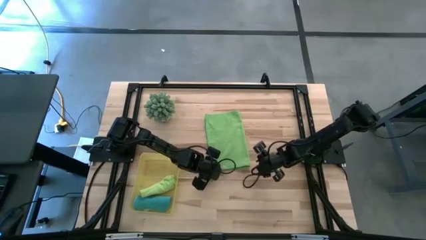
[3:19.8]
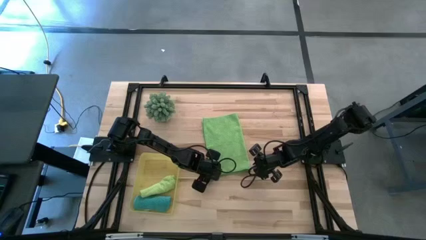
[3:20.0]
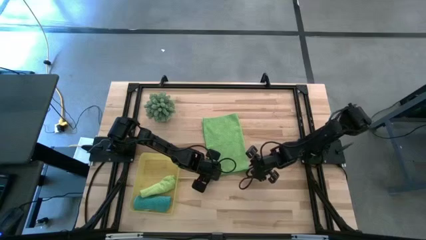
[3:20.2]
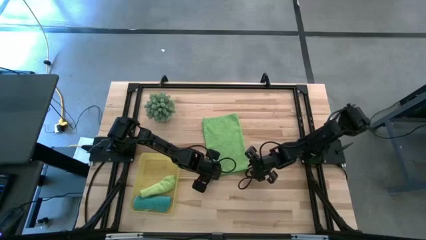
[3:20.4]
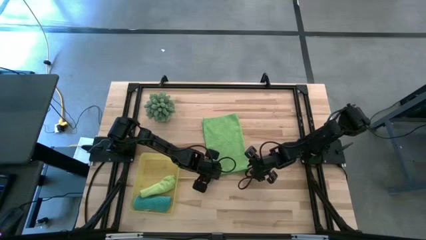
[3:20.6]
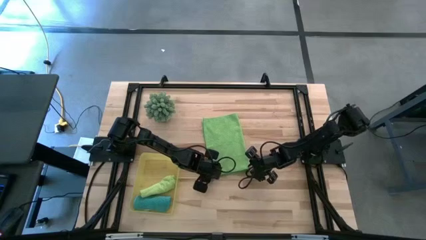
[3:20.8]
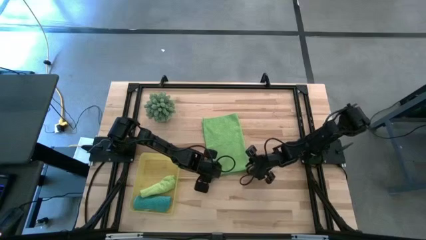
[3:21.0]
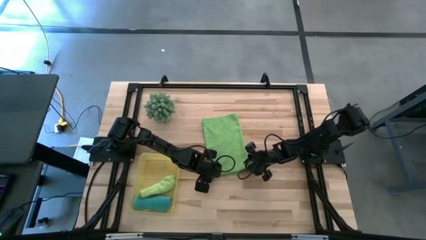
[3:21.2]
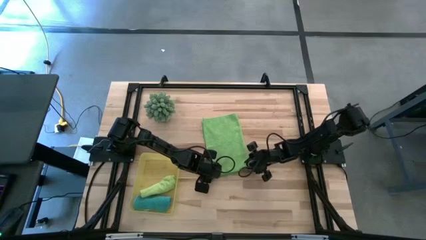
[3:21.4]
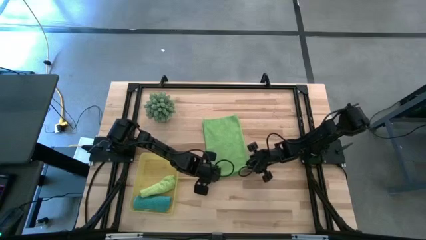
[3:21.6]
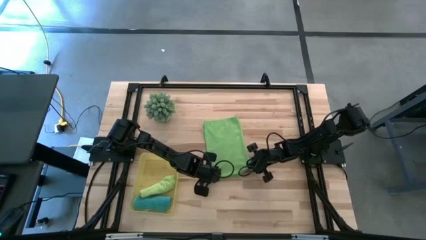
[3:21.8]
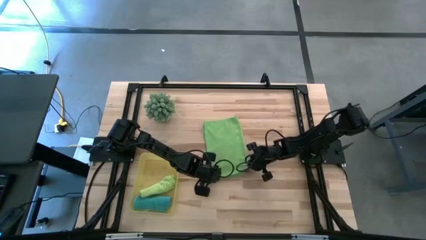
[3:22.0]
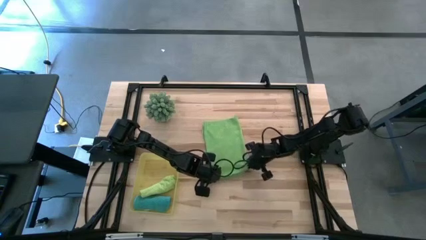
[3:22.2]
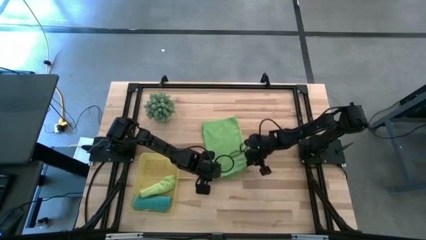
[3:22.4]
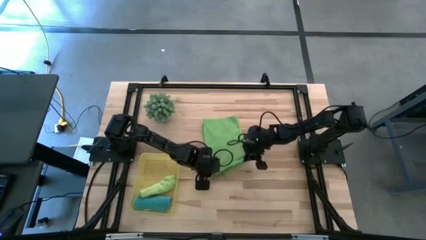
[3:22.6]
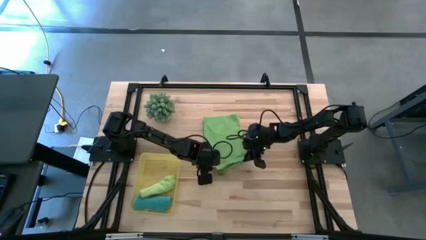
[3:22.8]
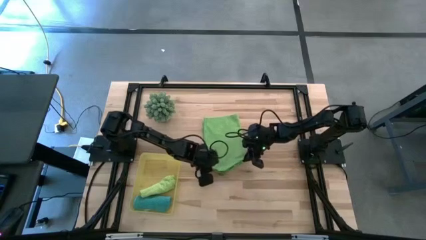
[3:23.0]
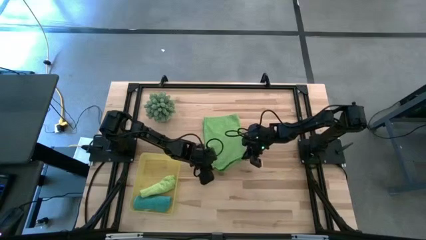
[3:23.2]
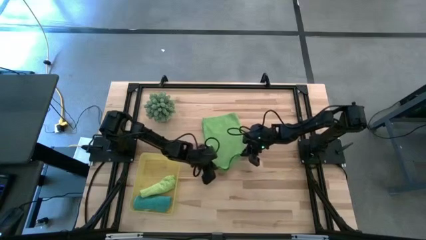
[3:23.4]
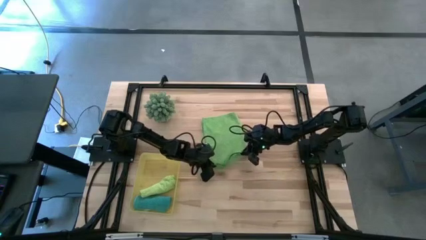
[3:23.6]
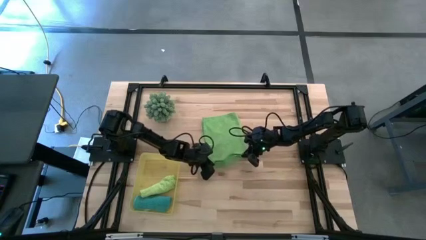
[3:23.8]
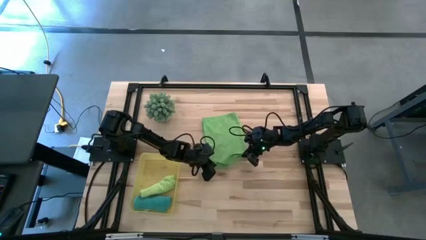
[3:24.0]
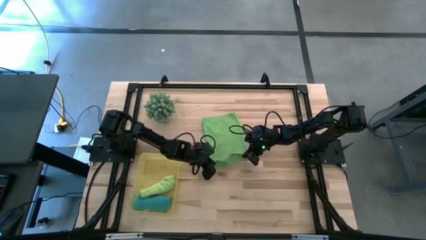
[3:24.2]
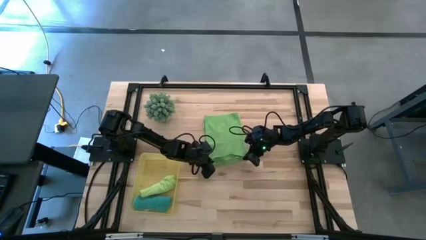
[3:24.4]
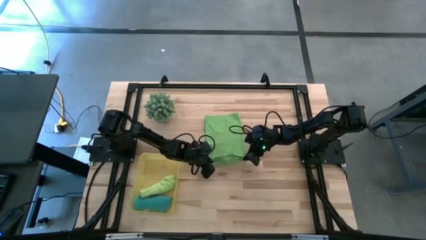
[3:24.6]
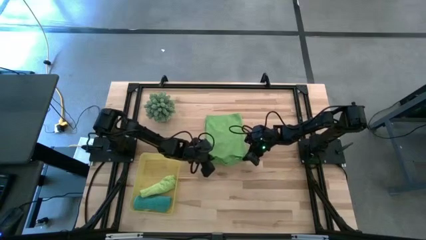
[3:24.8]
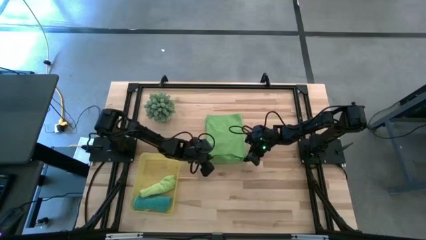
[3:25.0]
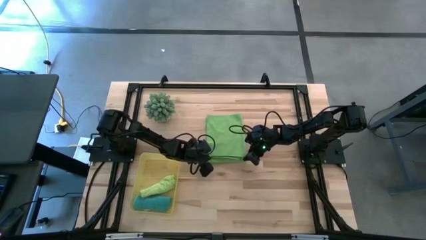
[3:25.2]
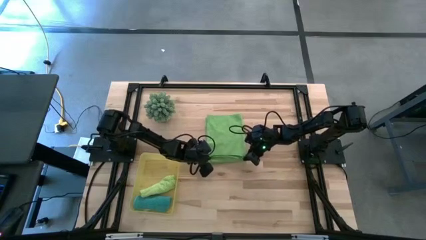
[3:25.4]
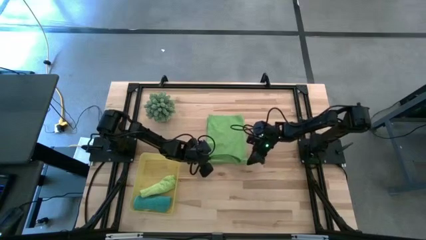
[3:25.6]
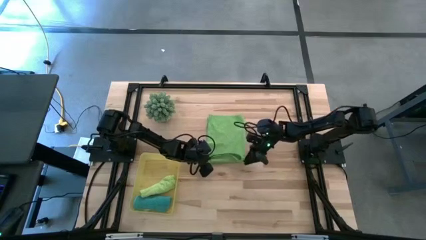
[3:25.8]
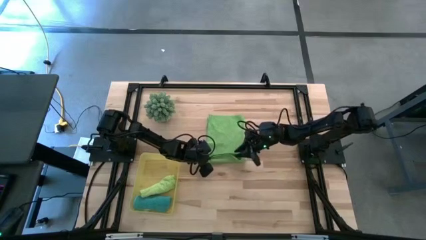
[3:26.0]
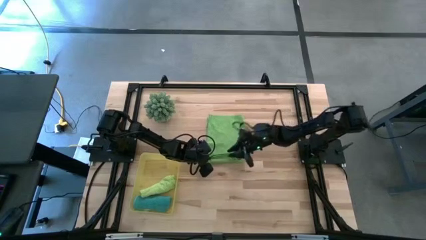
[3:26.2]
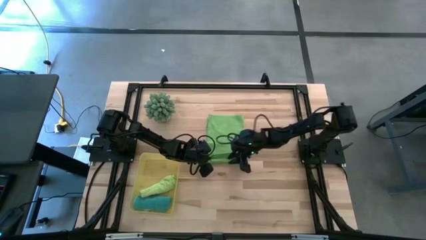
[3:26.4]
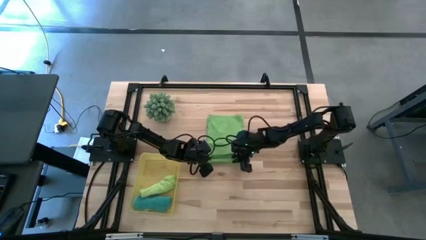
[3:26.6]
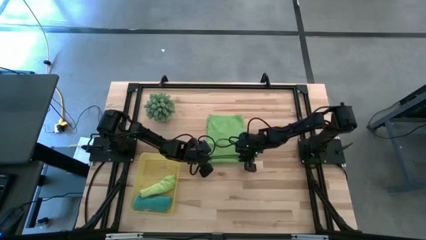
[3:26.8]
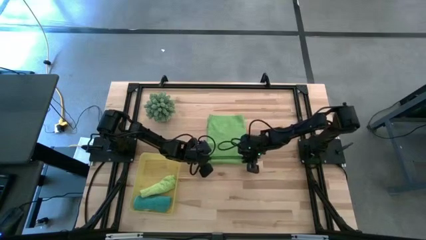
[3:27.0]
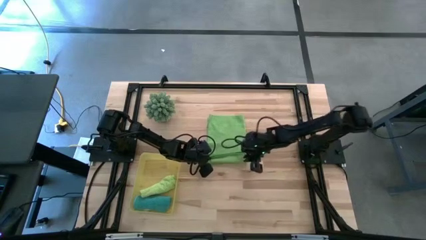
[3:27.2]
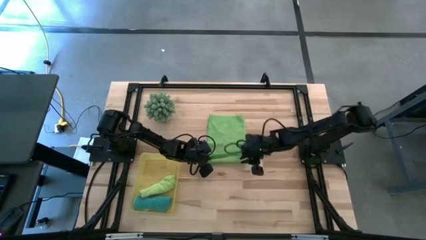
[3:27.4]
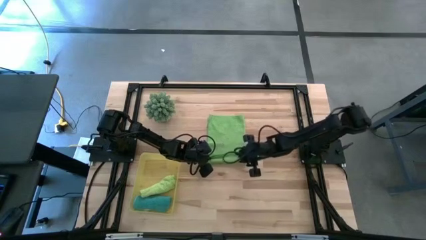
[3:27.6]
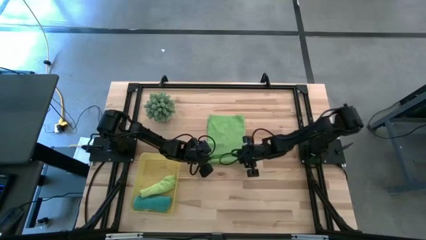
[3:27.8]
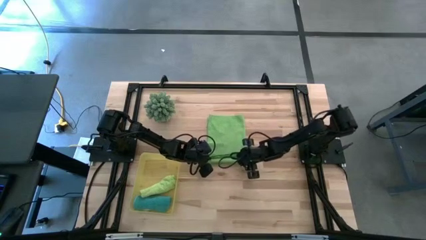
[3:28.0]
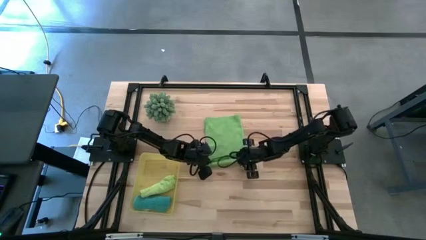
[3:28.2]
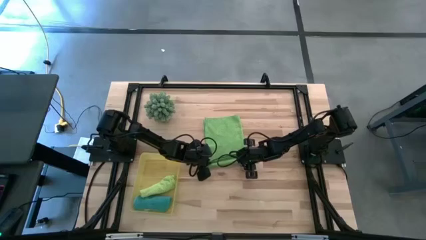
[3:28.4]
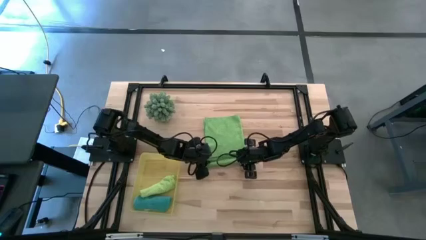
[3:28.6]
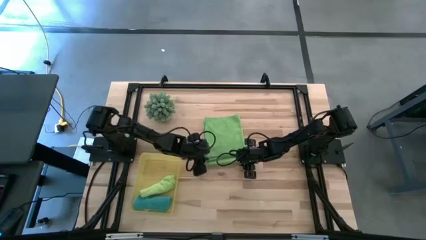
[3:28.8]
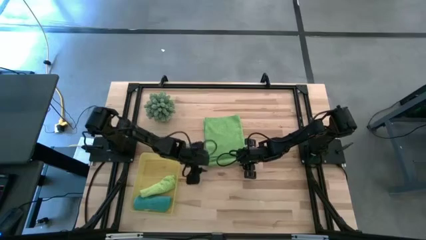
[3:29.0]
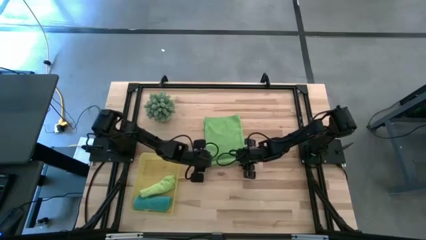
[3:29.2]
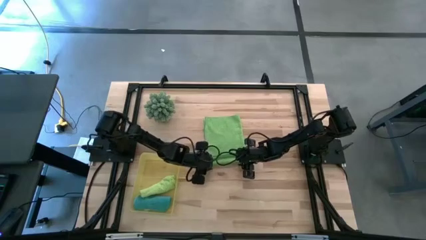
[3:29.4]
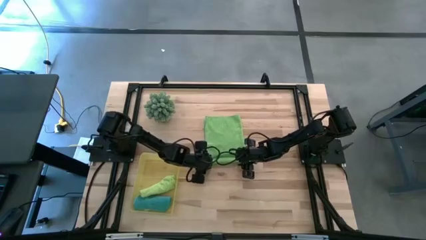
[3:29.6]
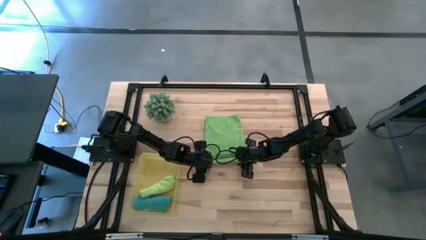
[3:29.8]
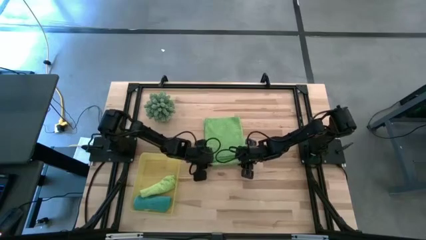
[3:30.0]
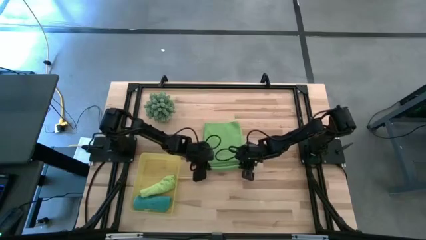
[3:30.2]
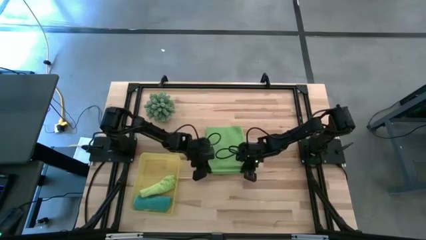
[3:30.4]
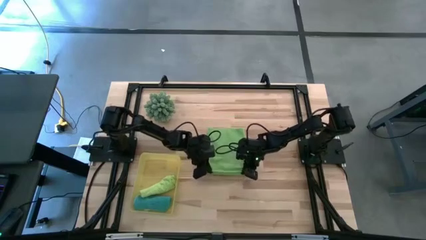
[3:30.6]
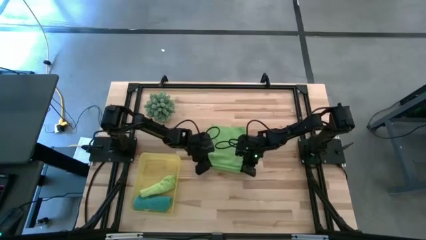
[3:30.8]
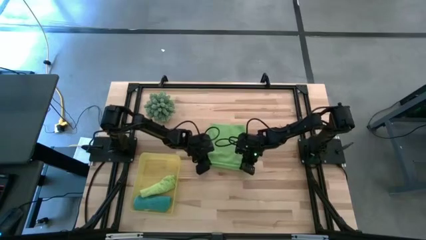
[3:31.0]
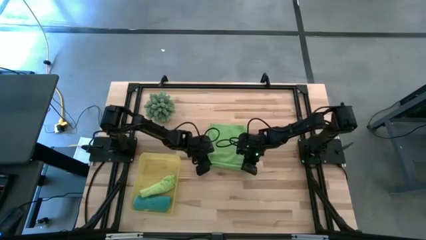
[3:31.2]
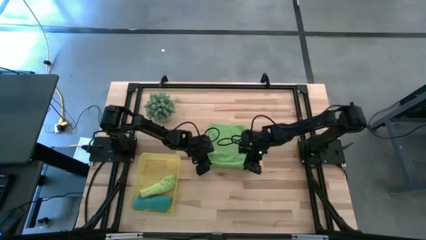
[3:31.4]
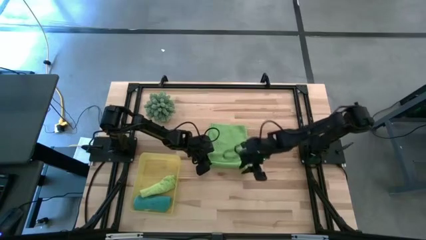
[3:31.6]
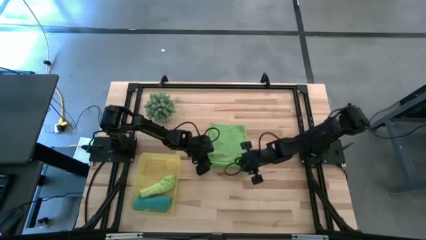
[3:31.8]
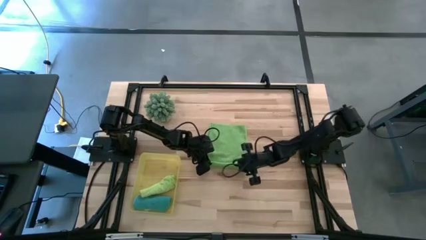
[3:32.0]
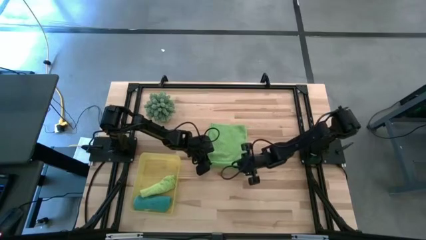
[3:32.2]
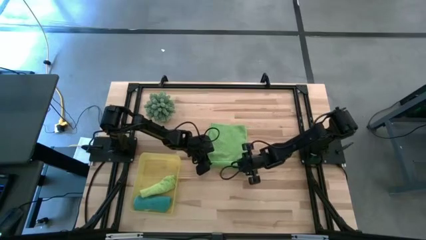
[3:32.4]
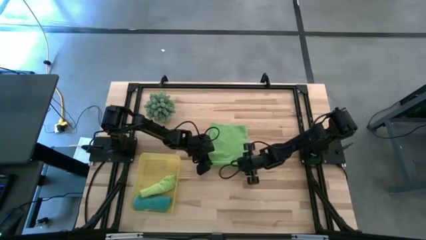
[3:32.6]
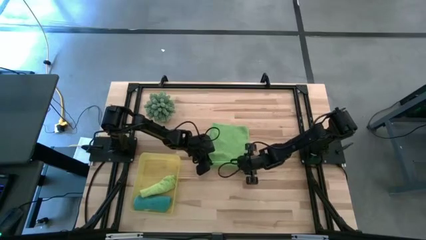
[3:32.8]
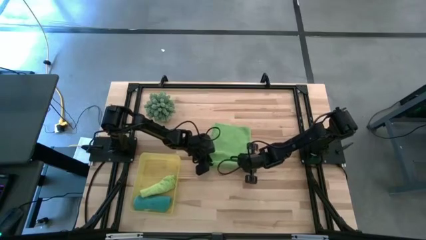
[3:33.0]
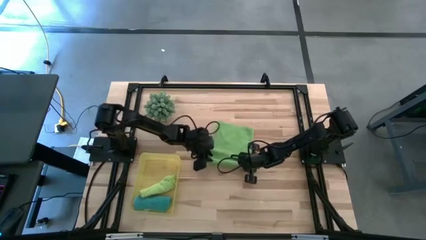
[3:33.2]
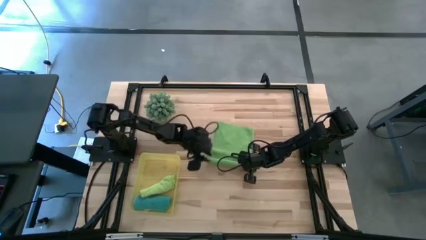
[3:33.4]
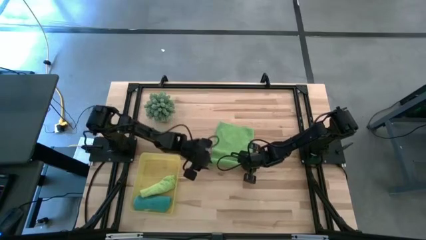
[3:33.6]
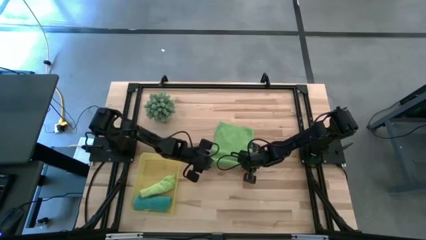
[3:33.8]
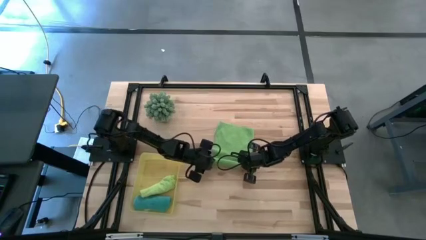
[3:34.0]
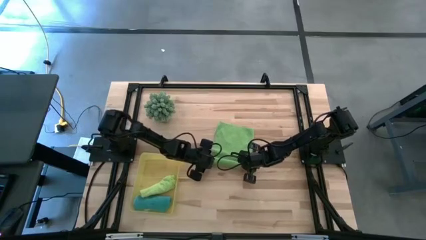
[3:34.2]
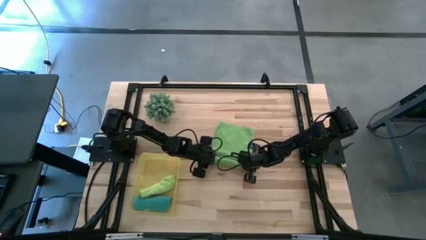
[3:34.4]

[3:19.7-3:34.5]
Task: Roll microfiber towels into tight, uniform cylinder then place into a basket
Roll the green towel

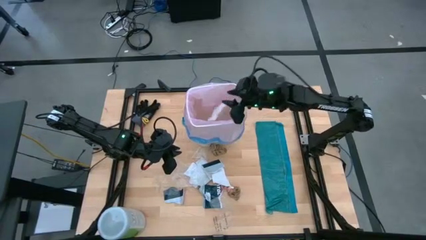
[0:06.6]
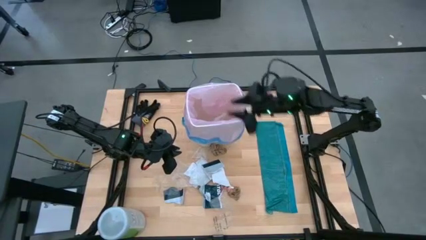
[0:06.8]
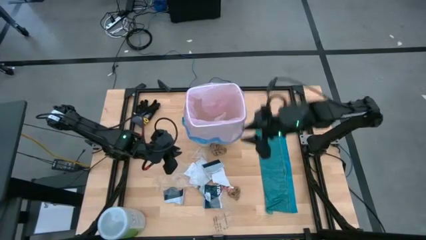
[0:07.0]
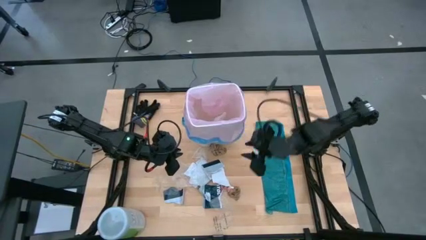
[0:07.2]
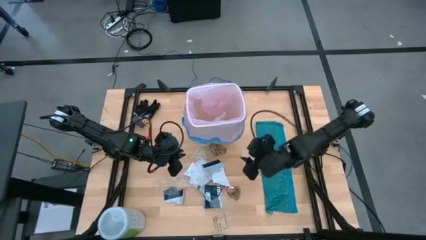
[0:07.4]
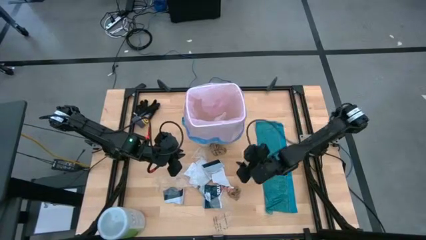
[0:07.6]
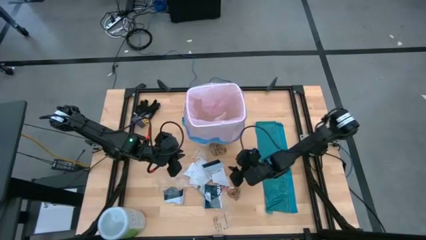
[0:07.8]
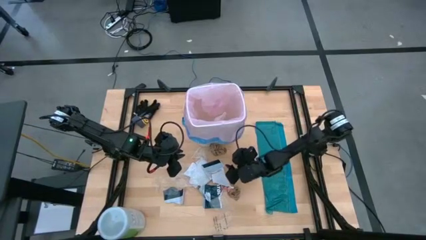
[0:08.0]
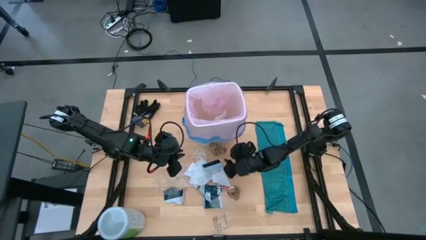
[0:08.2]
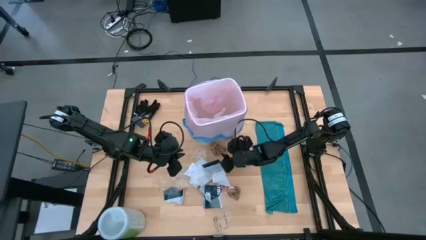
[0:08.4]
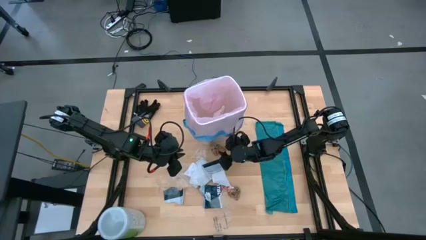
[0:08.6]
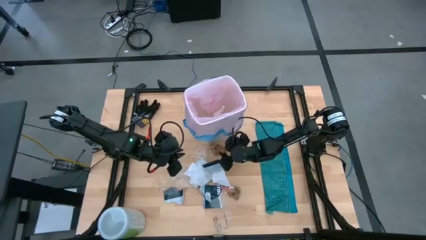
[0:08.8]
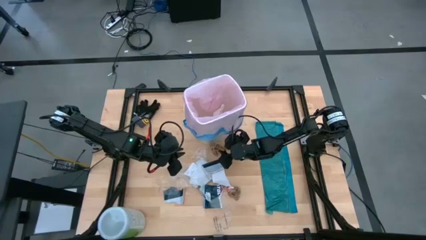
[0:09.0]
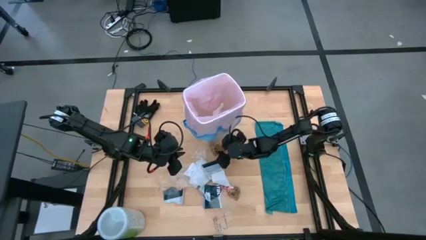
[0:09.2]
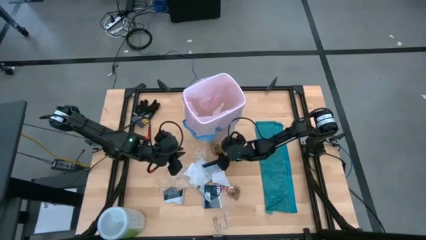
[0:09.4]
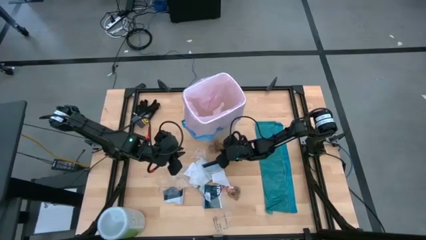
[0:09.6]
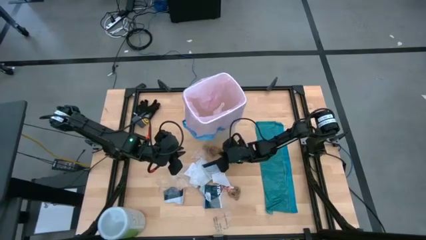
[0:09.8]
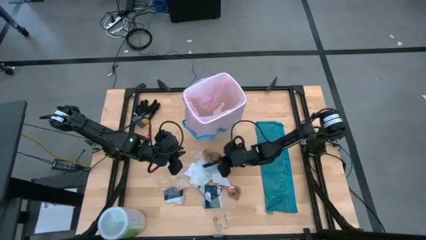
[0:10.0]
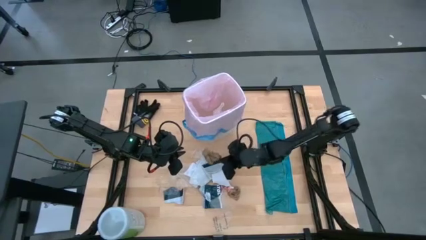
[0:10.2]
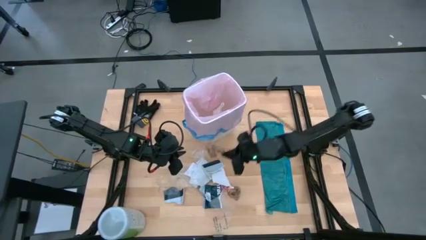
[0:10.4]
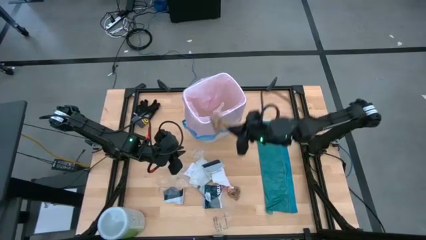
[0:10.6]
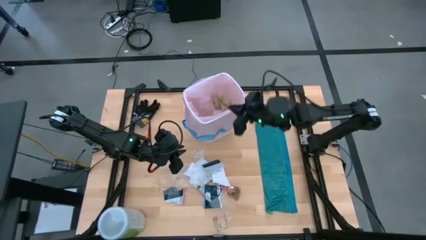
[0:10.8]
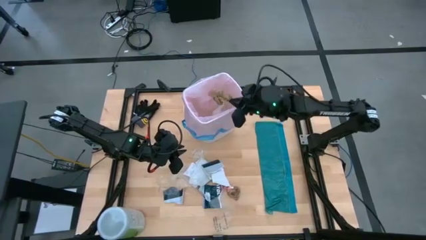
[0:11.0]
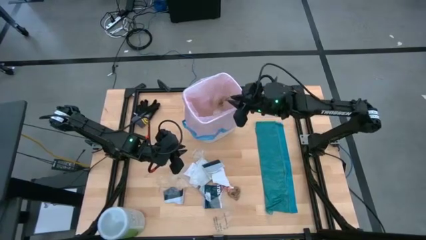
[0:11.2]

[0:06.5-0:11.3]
Task: place trash/remove bag and relplace
Put the brown paper into the white trash bin
